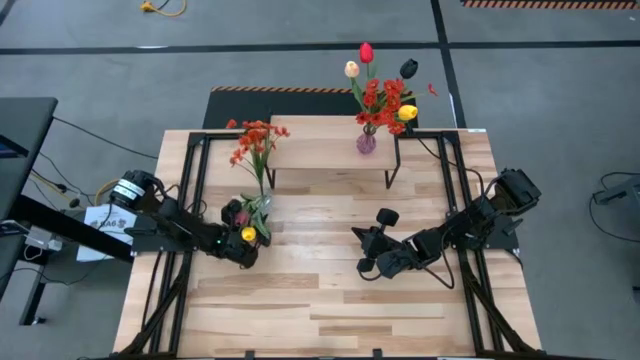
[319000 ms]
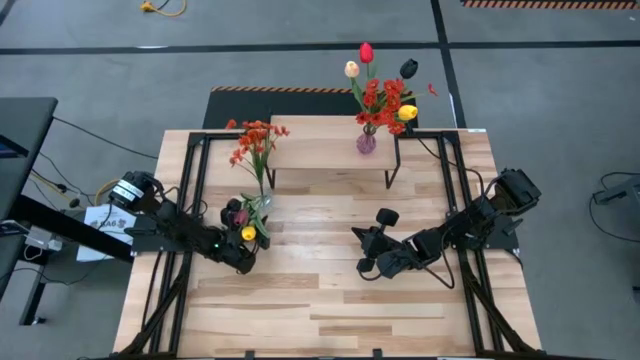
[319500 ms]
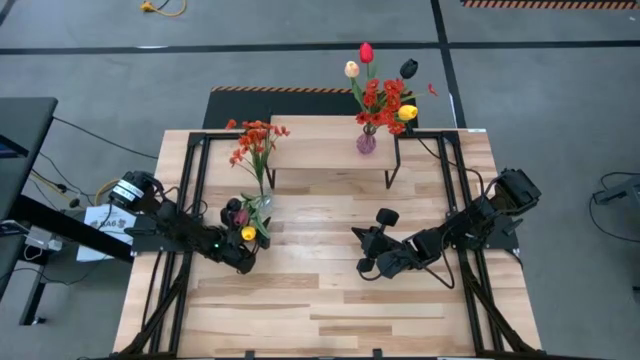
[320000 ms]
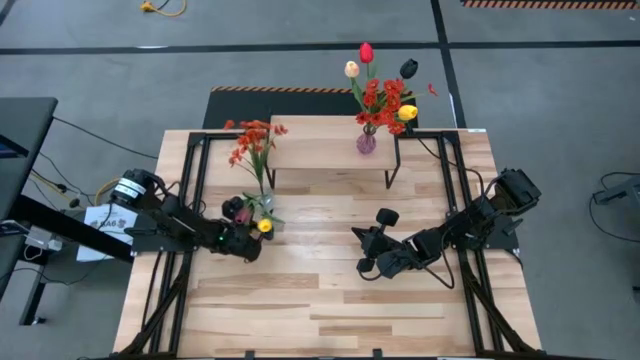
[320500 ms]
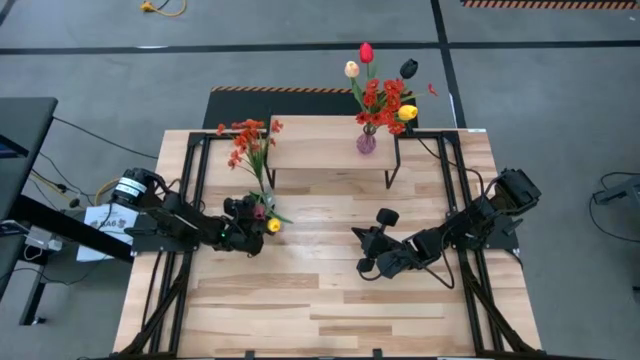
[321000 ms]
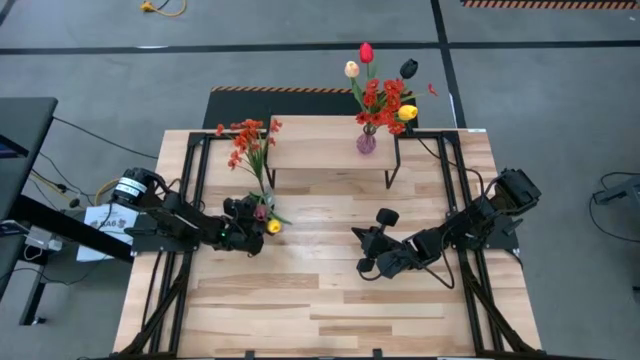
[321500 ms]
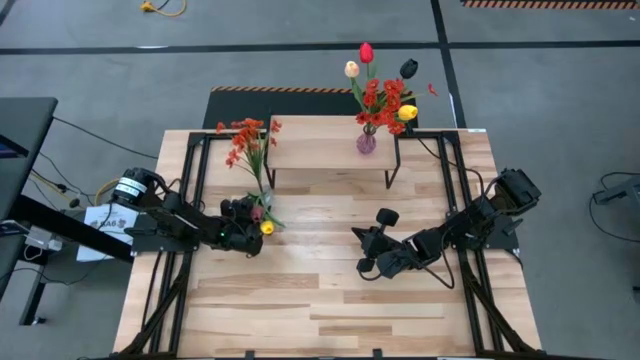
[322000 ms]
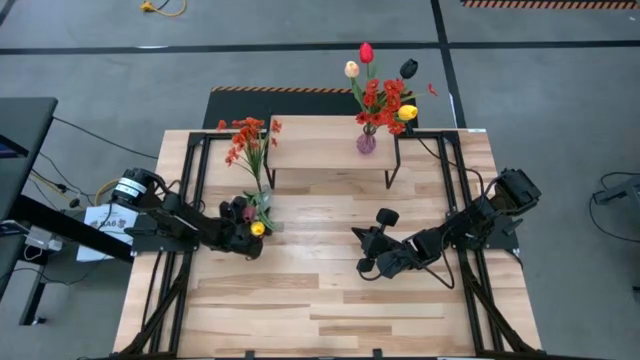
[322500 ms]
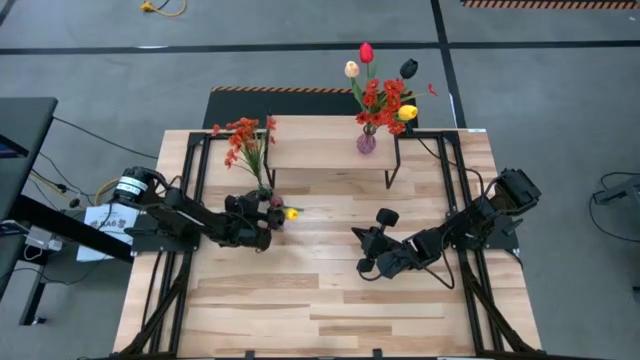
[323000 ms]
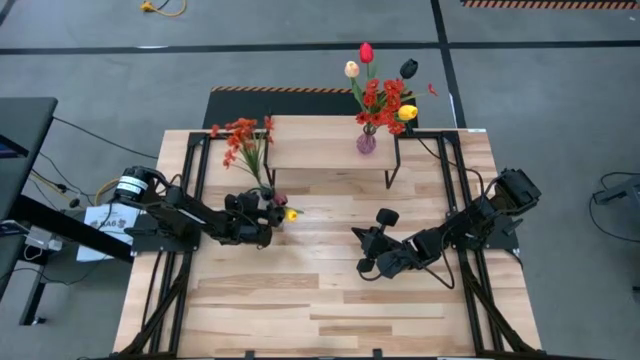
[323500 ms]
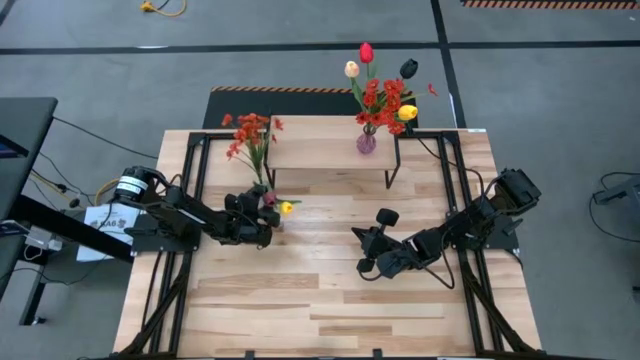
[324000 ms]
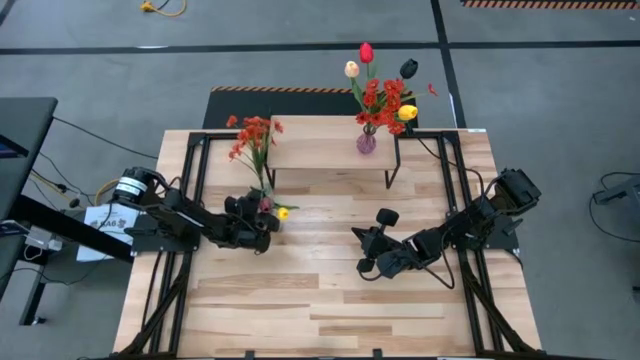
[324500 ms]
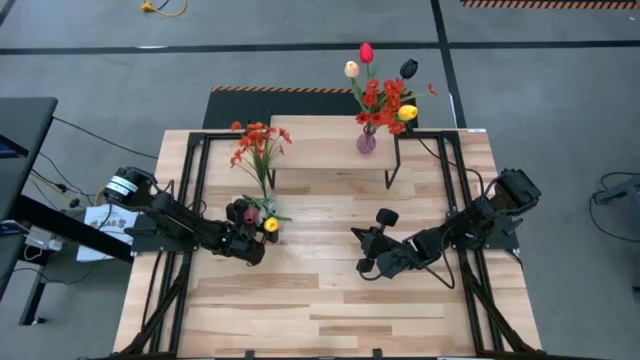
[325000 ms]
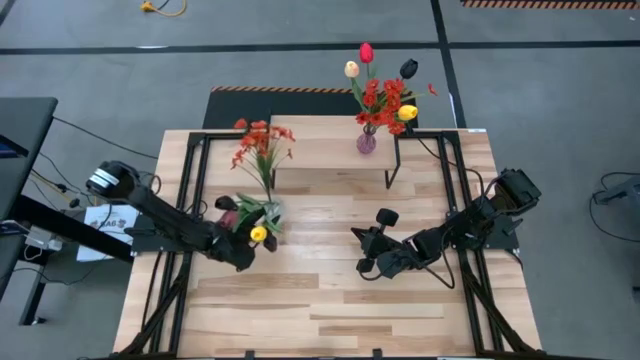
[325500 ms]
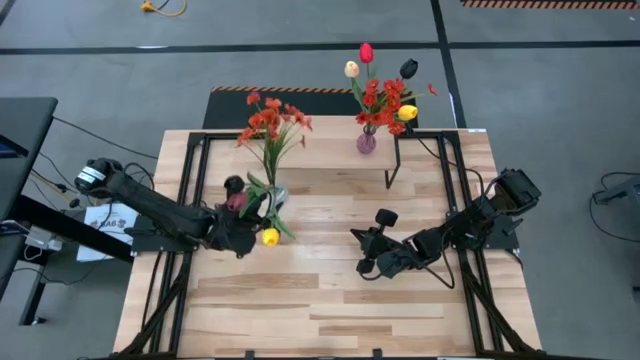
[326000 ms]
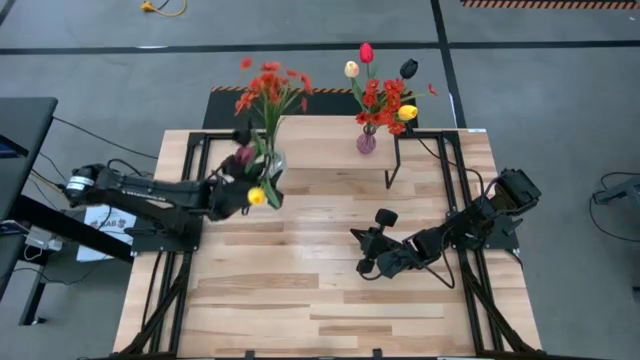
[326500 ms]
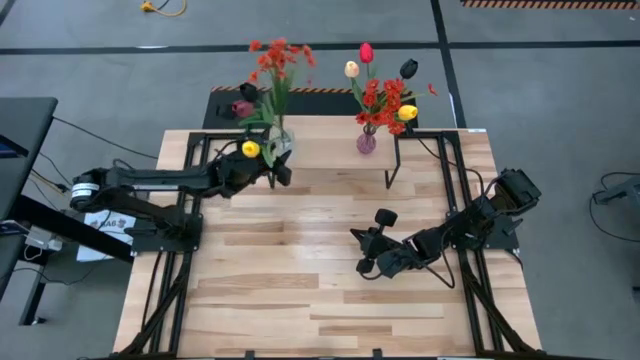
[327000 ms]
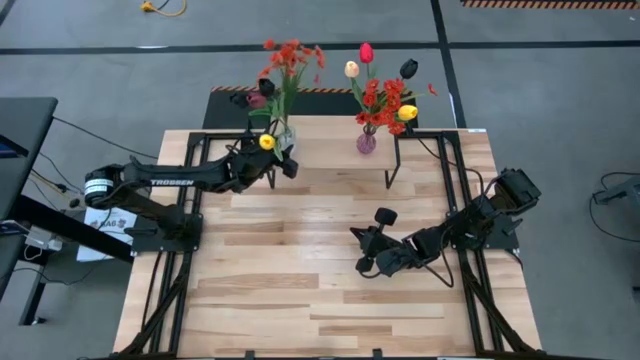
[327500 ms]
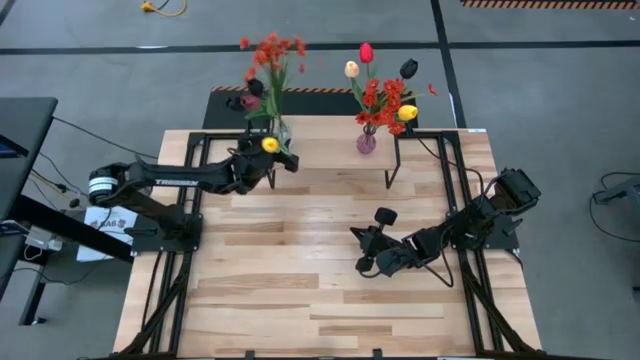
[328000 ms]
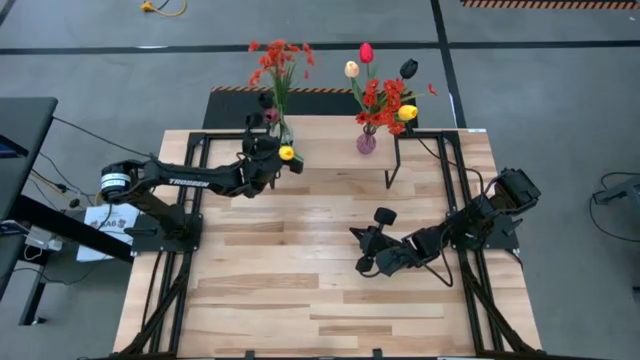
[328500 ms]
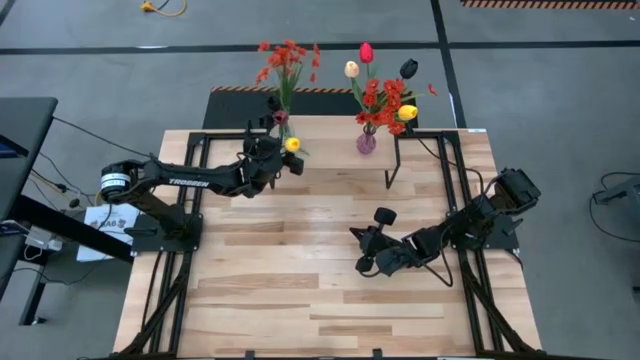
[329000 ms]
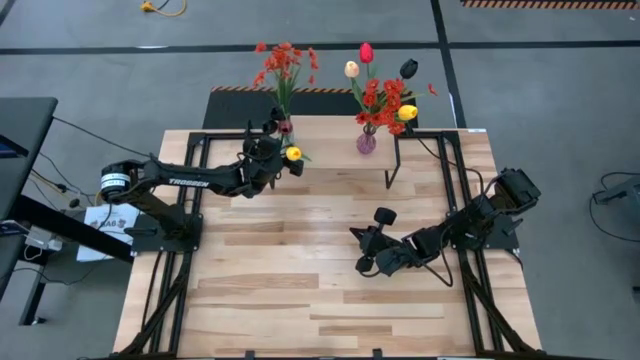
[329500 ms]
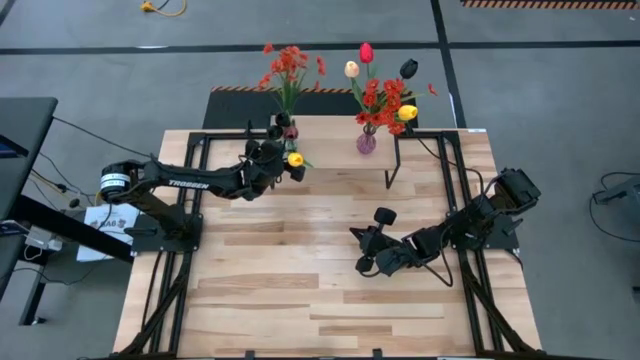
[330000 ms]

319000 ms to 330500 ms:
Task: Pick and place flowers into a vace then onto a shelf
Put the transparent vase with the flowers on the shelf

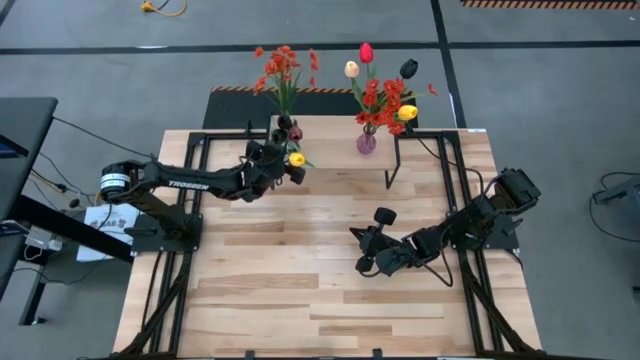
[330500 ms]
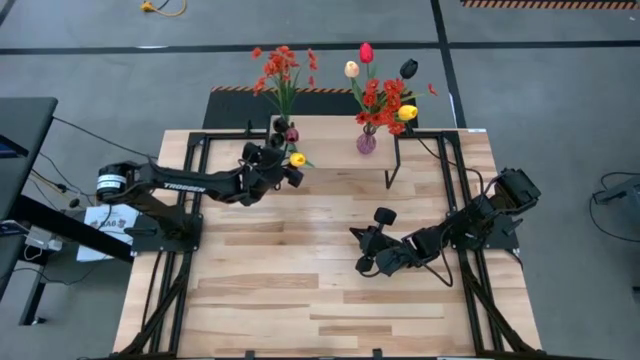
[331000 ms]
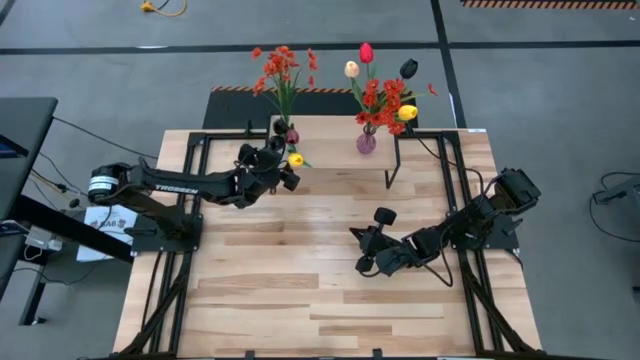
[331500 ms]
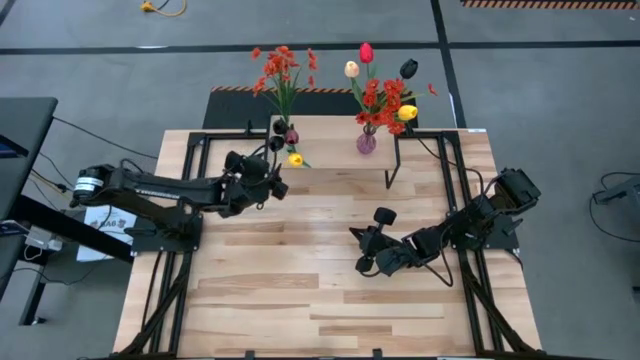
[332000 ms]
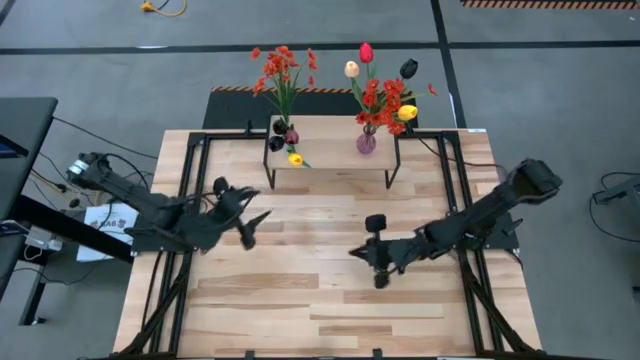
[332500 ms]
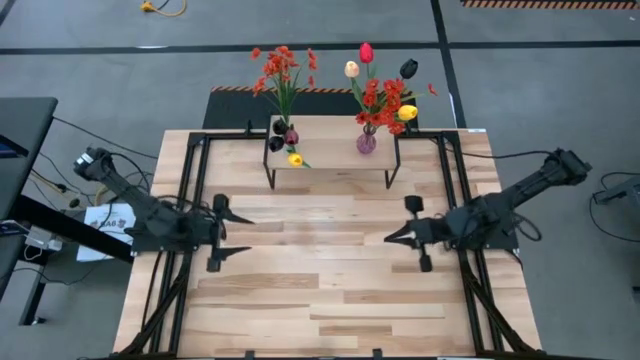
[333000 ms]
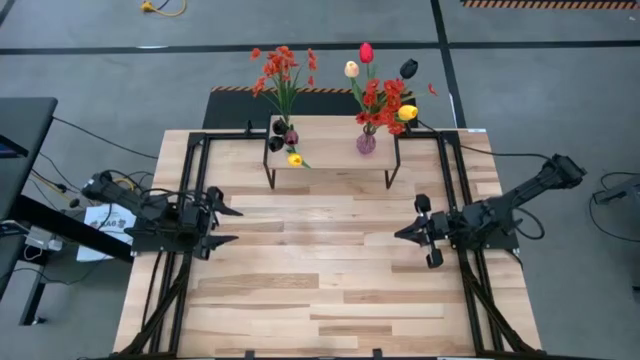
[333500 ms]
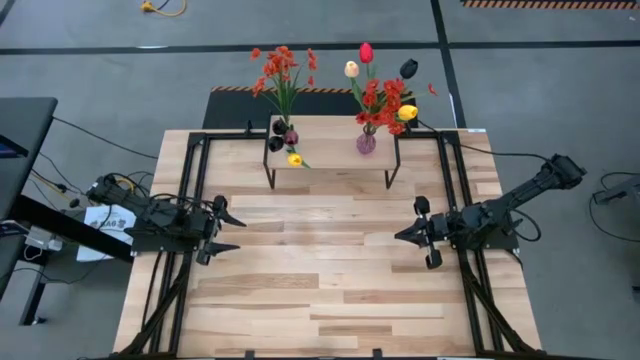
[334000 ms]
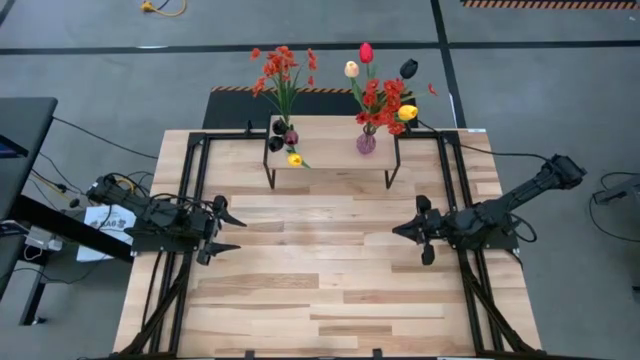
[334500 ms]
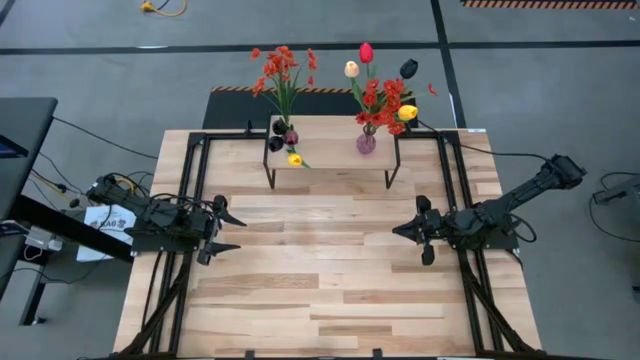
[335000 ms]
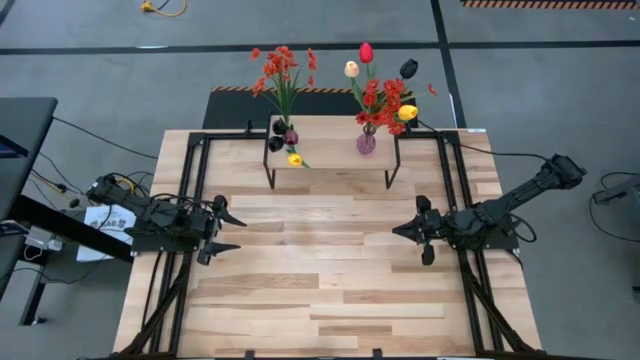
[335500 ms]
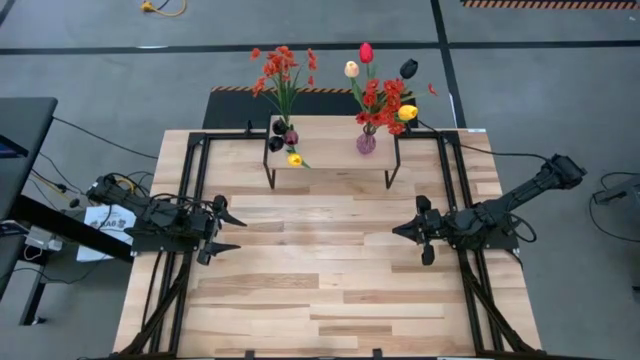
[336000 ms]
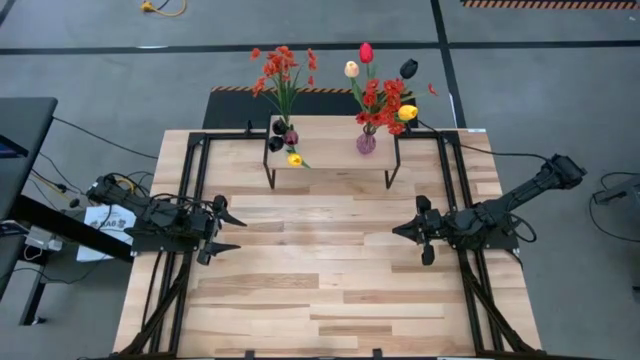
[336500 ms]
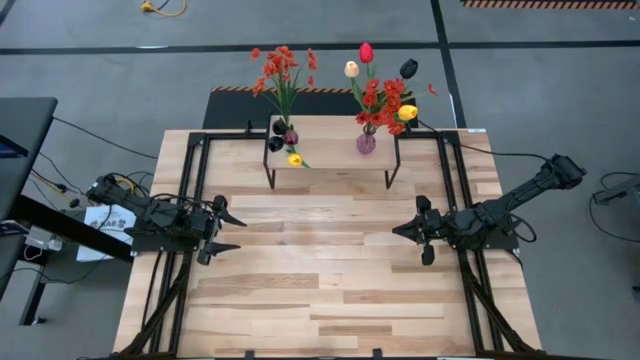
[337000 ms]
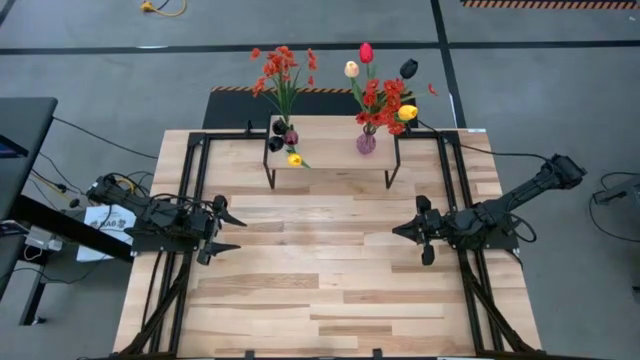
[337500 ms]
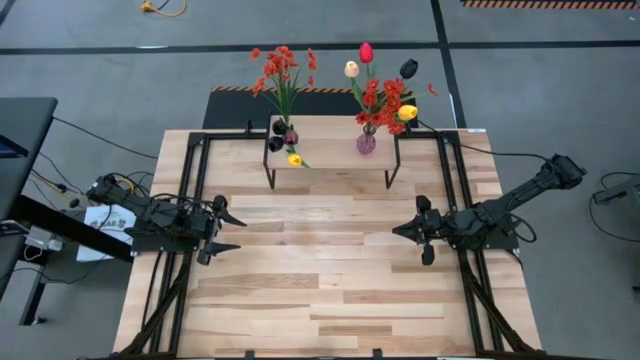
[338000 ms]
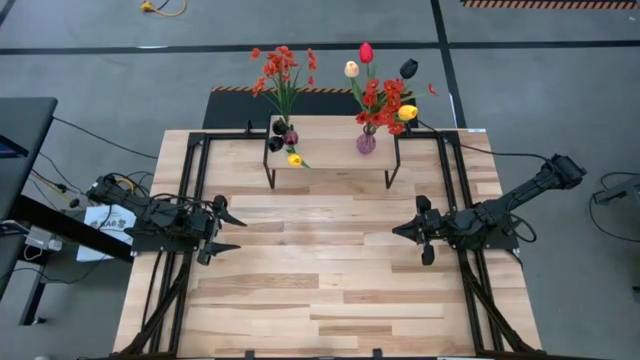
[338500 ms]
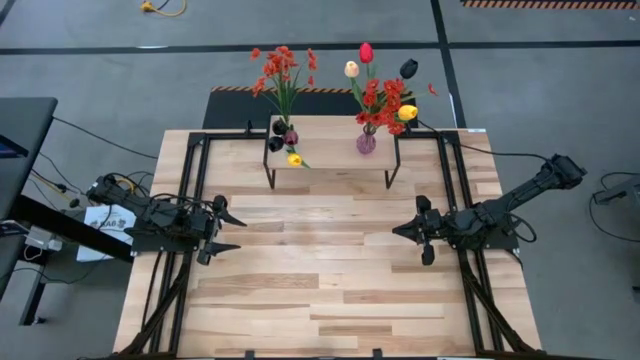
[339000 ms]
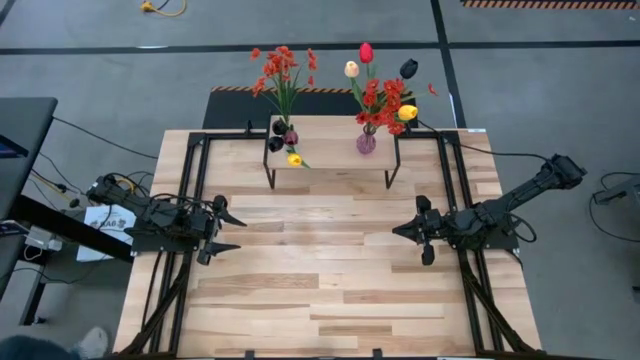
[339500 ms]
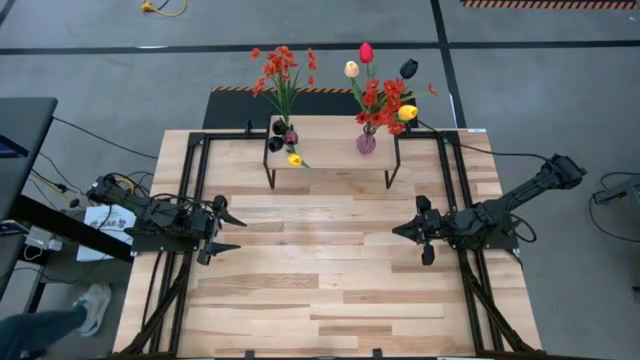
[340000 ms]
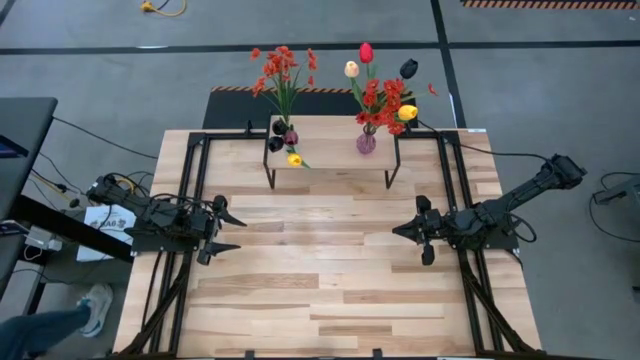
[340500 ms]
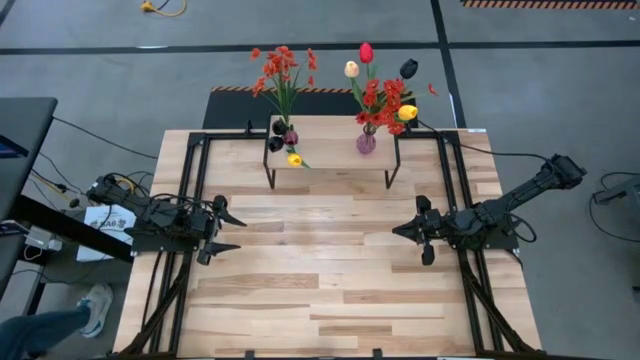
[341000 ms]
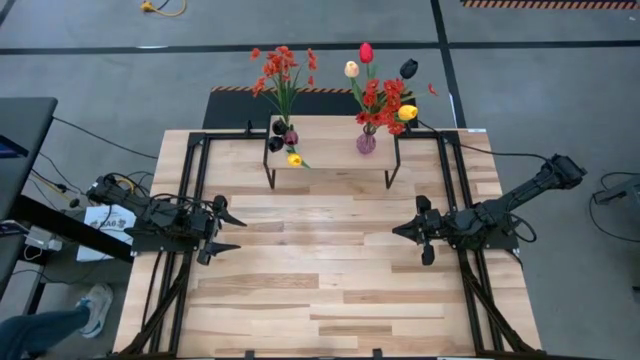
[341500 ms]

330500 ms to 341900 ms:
Return to Home Position
